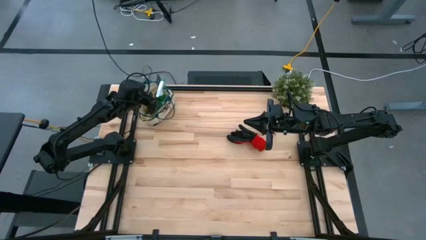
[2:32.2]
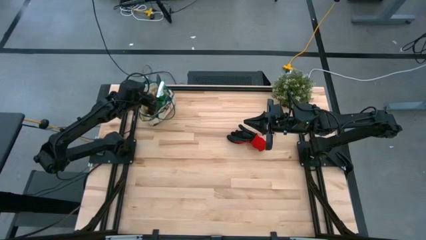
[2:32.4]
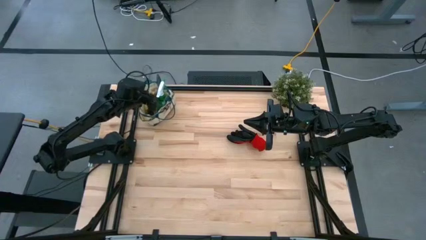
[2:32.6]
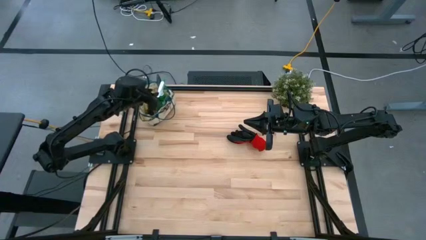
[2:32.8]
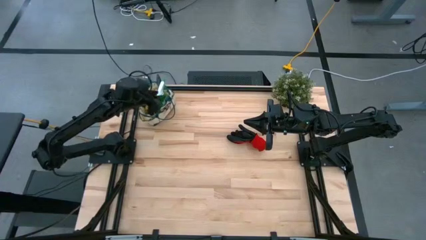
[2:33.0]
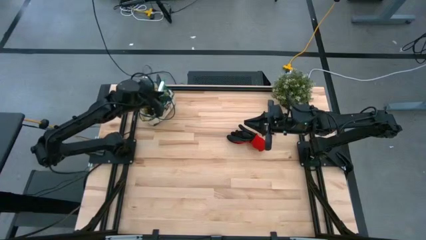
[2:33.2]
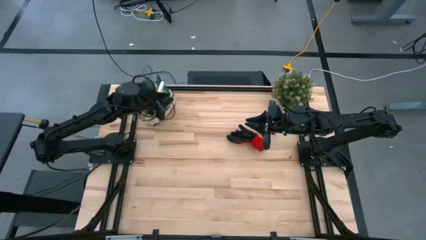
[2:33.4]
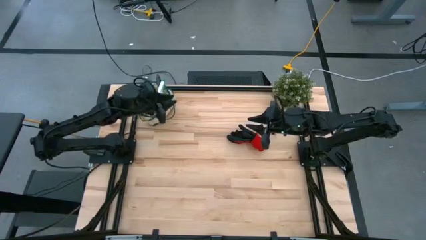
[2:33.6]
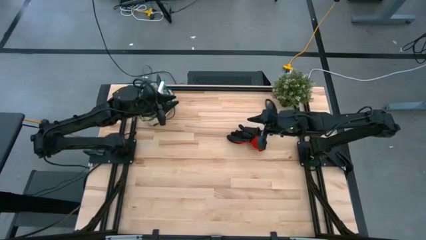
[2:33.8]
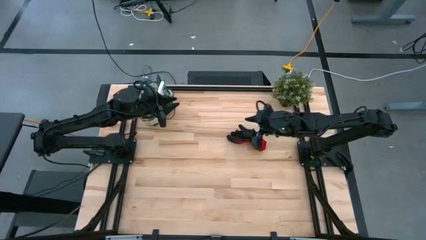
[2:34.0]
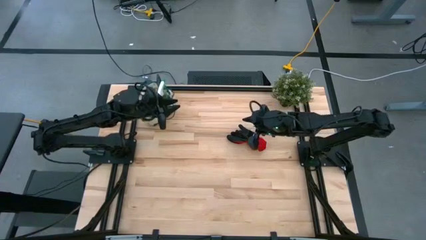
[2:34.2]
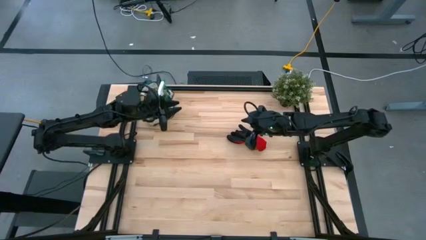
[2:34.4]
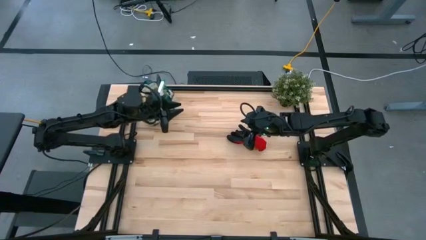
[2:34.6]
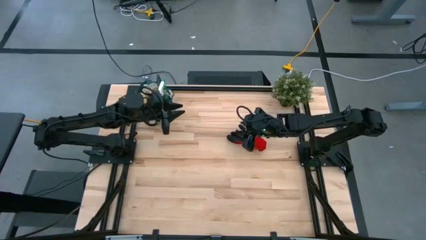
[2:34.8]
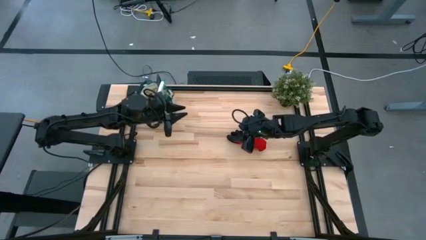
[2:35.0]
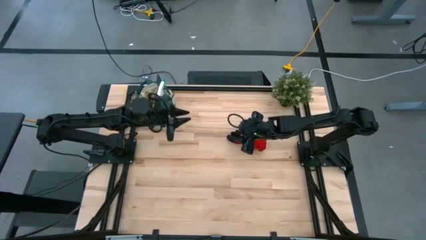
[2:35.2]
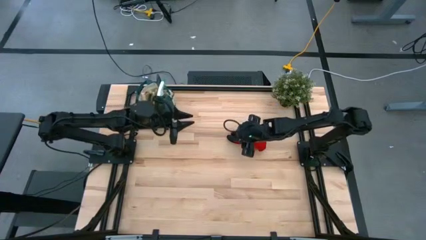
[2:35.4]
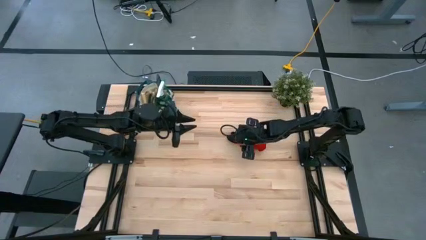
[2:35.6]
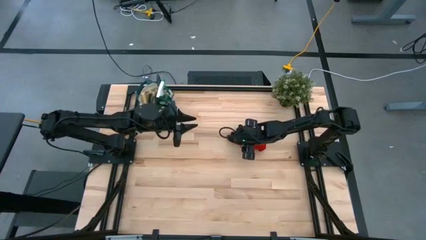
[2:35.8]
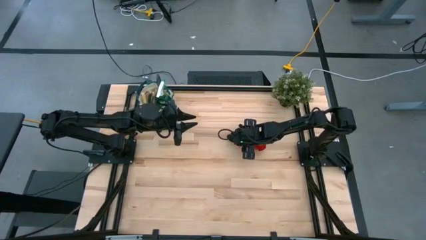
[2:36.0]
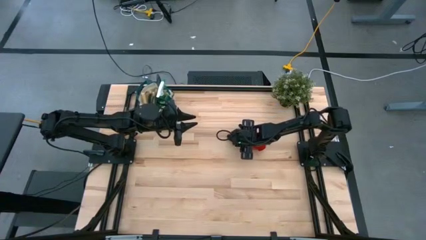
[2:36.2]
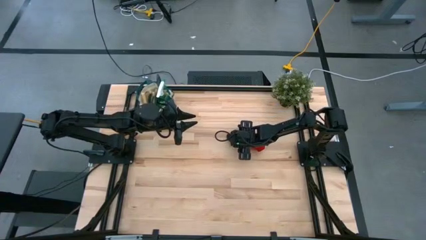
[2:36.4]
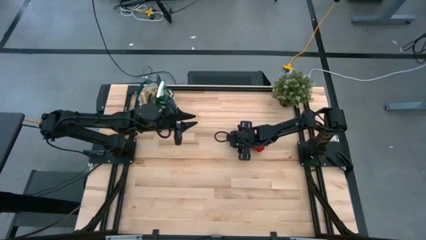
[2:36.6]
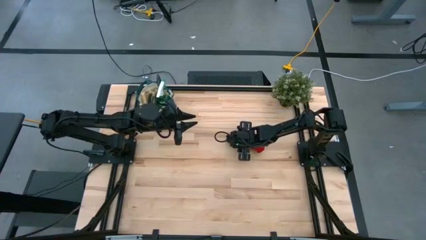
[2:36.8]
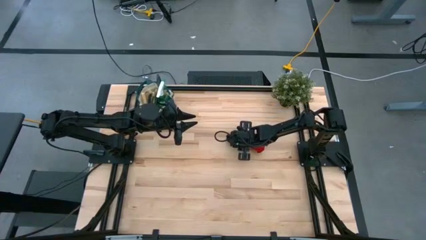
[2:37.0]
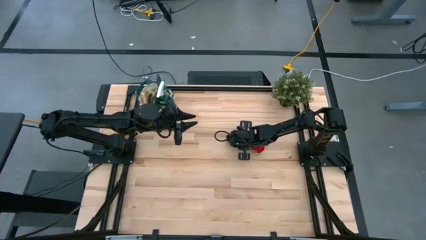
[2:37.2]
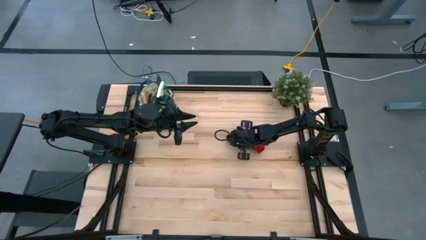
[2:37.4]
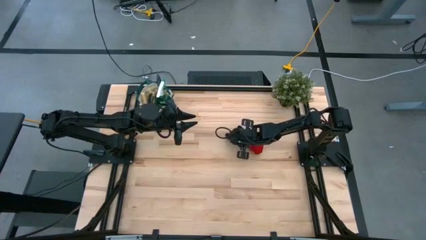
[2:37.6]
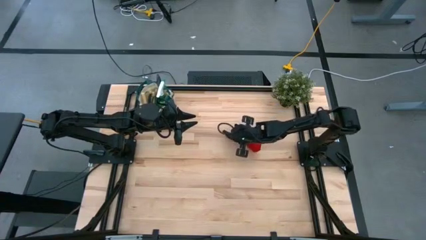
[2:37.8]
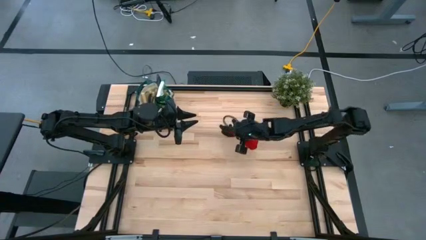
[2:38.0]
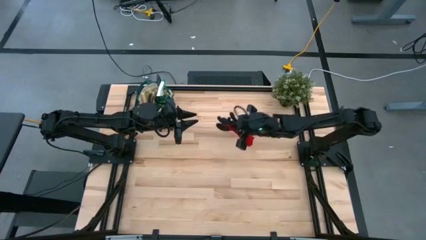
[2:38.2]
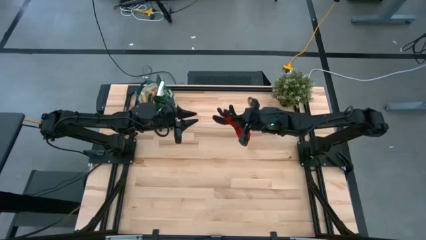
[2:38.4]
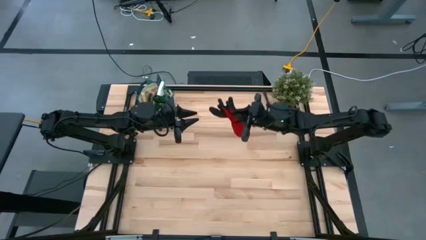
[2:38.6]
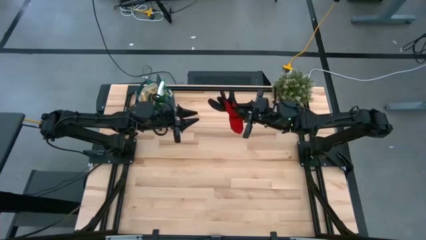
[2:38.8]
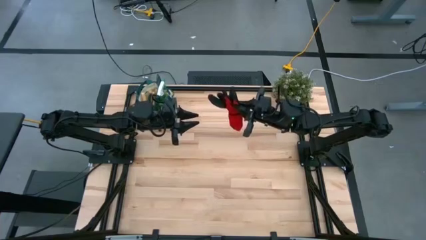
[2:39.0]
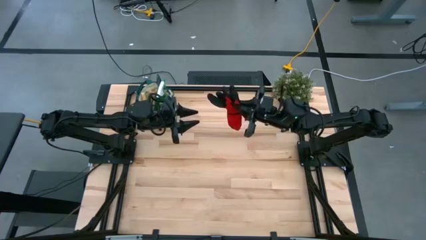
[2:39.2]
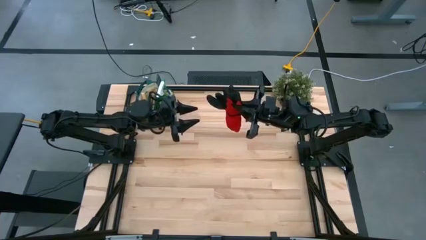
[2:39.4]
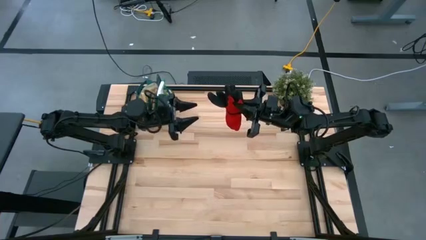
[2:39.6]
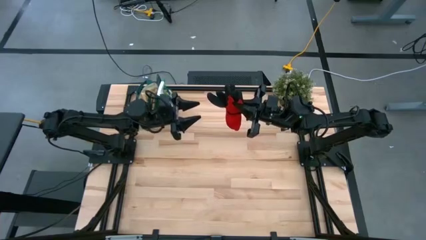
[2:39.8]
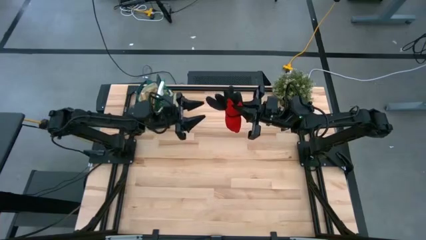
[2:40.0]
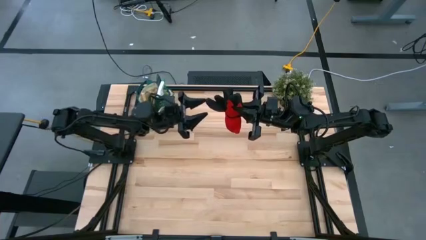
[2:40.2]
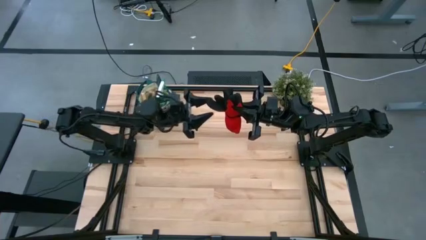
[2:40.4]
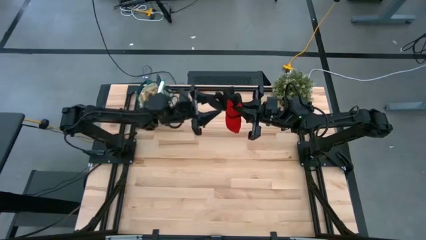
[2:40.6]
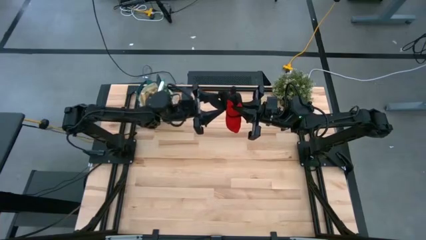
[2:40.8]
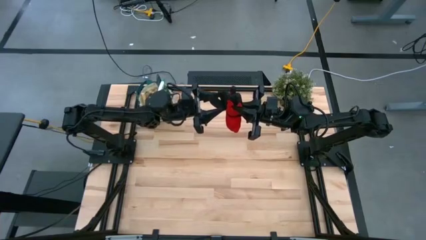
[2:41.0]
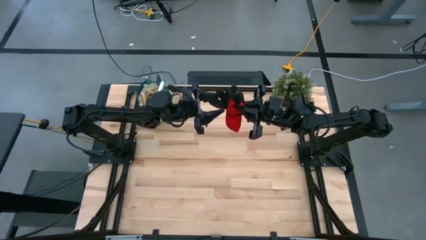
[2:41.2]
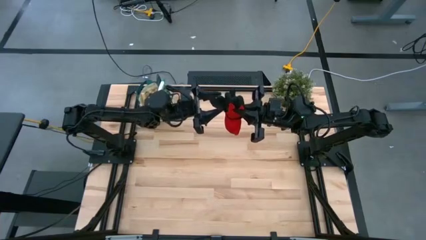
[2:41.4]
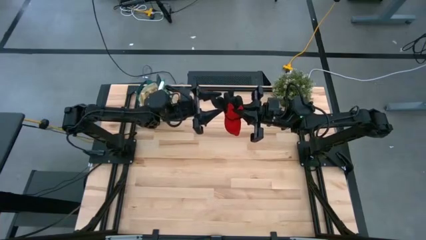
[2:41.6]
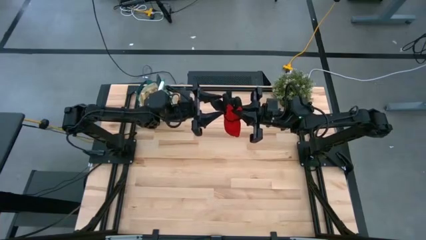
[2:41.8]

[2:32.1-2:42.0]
Task: Pick & Place Garden tools in Gardening bag
Put the red glove into the gardening bag

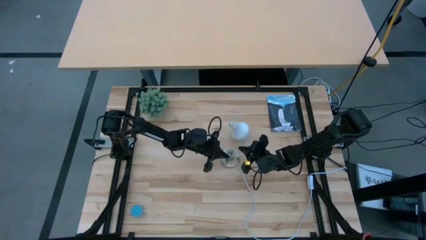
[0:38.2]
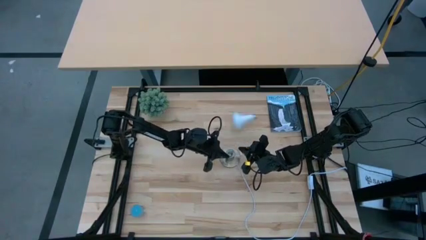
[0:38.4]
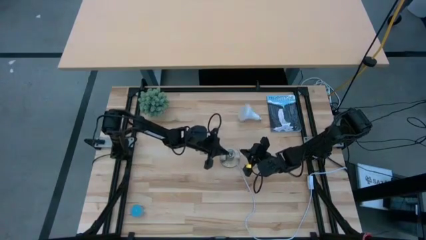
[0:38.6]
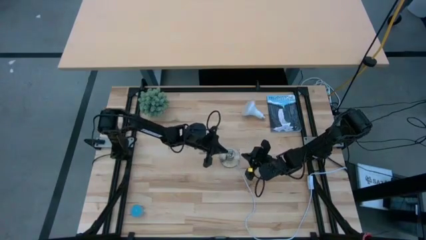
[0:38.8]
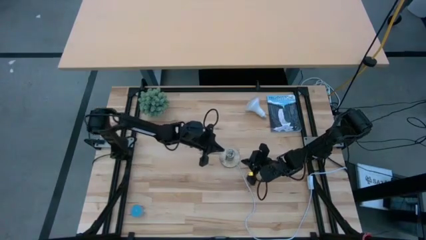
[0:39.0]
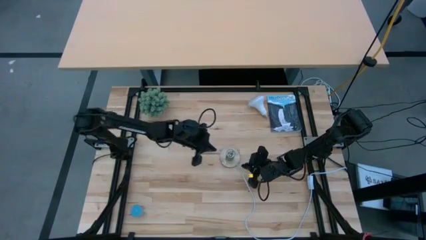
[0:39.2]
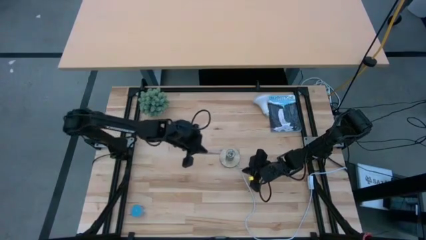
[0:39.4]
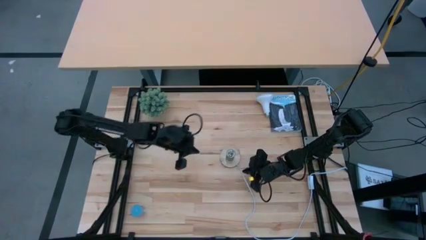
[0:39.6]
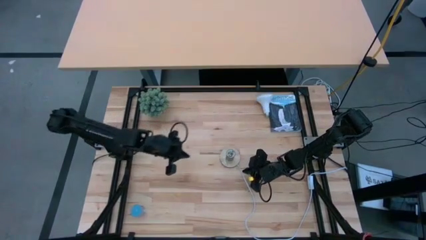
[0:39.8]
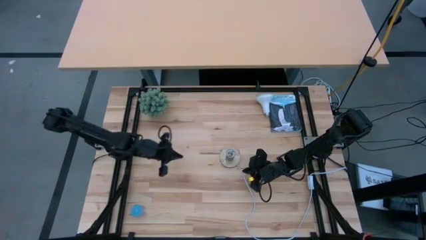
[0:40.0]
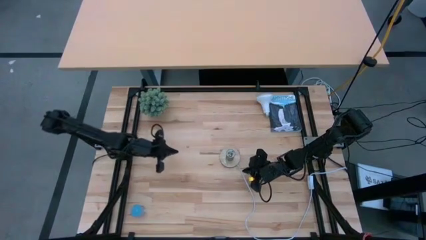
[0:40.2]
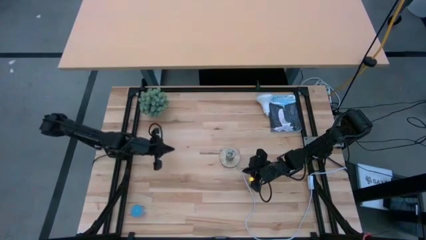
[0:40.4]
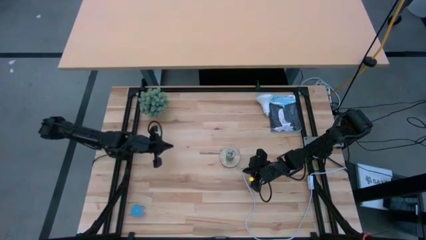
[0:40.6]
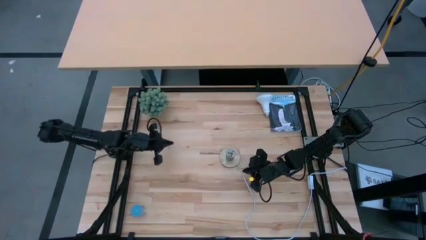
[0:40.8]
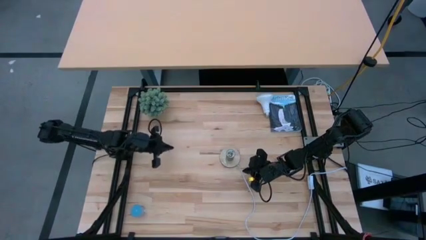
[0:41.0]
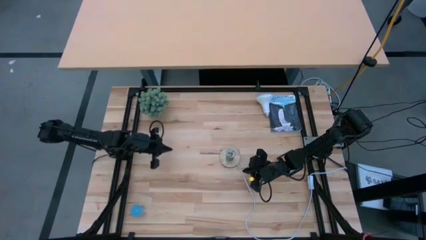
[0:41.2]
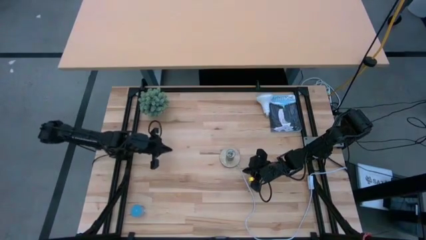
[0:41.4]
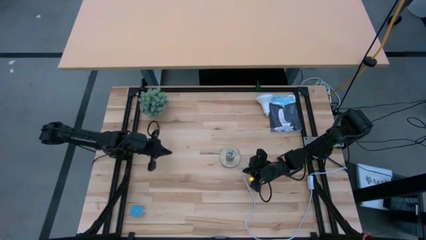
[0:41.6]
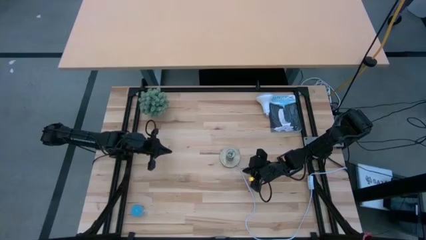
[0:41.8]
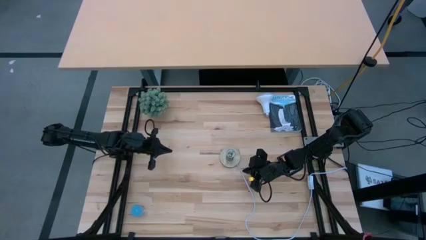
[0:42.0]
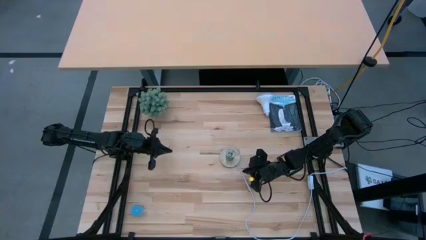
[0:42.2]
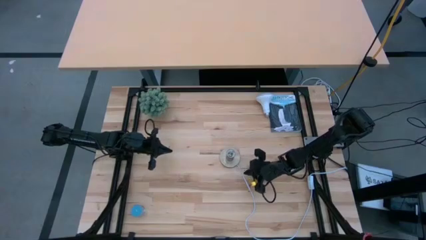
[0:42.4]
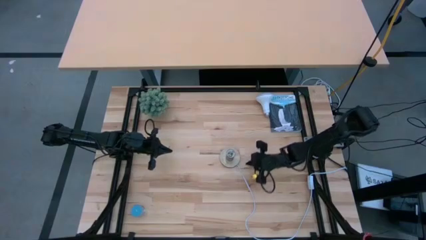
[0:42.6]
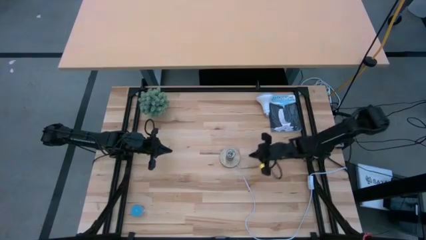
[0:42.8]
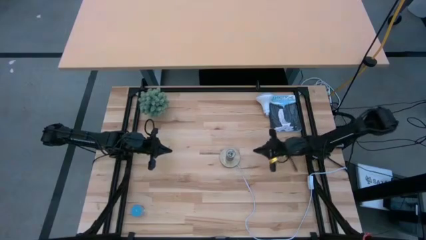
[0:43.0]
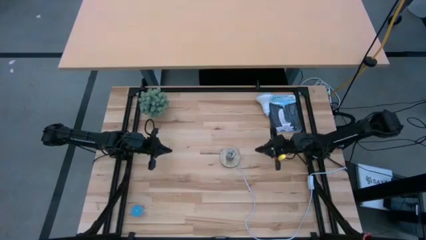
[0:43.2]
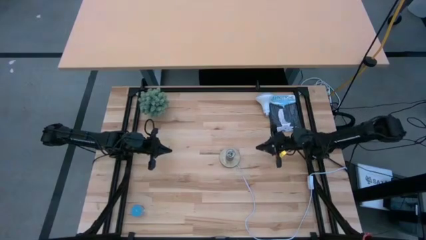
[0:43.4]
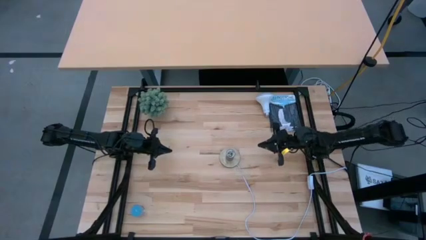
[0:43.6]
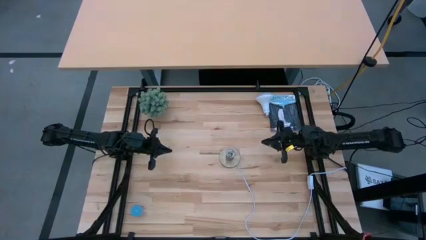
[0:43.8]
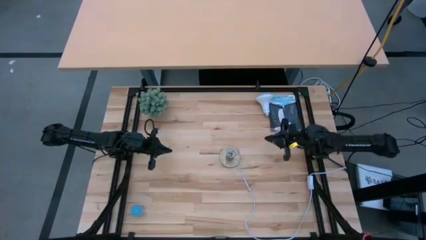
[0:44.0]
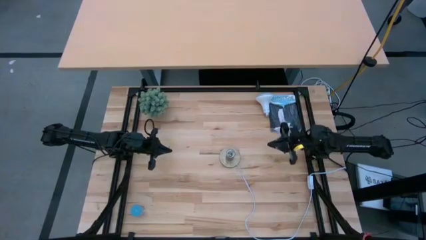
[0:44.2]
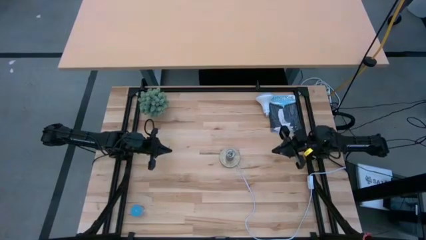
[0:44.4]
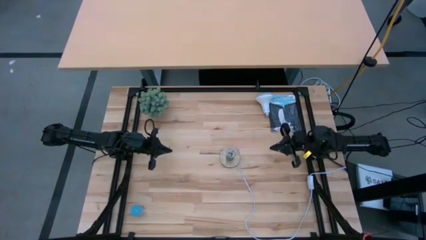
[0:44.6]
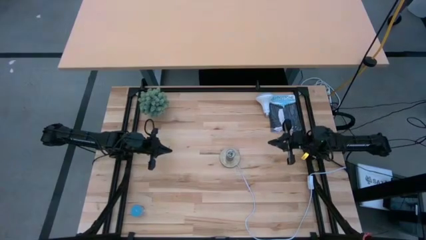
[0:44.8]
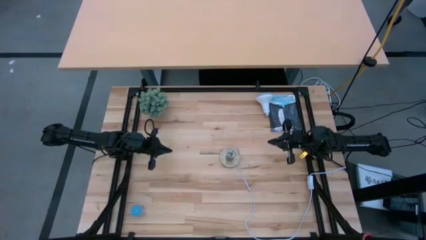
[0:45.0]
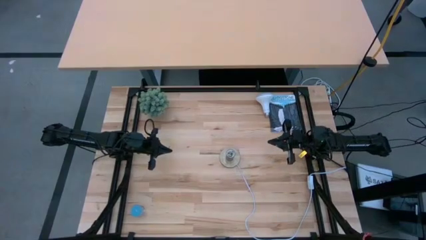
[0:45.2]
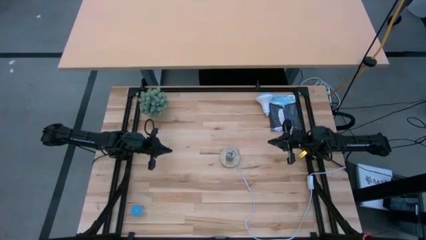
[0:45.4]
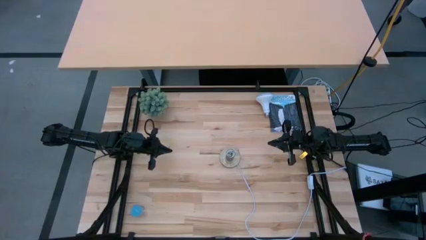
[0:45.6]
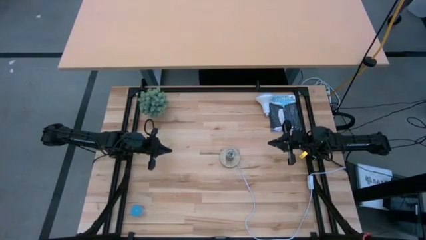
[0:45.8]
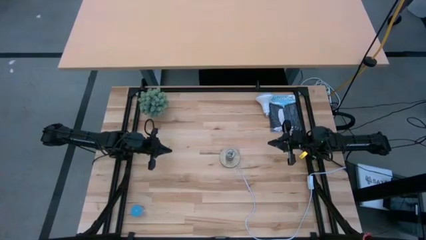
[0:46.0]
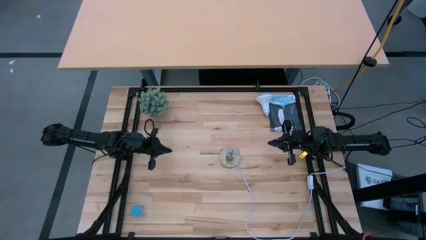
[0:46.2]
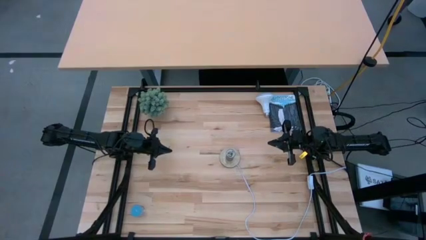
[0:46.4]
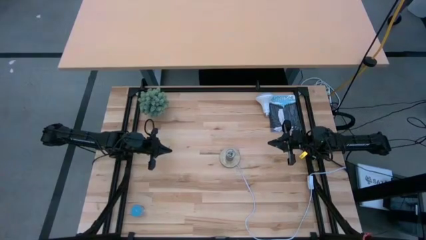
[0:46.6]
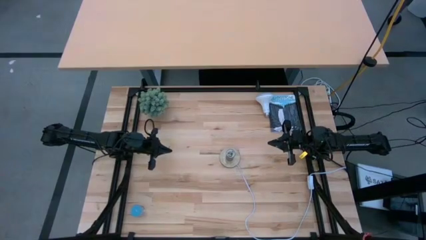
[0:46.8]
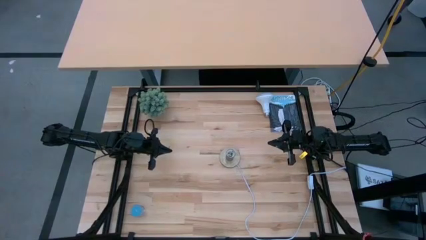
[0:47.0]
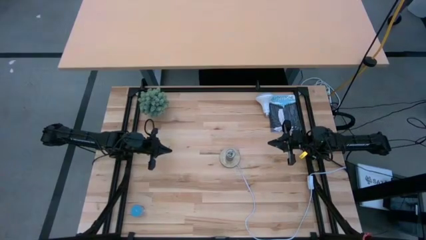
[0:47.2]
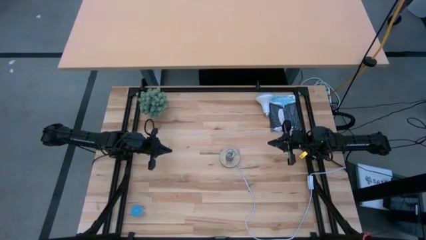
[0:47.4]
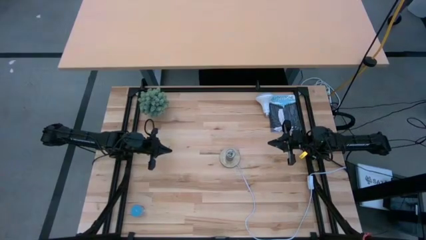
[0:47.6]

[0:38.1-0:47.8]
Task: Screw lightbulb
Return to Home Position
